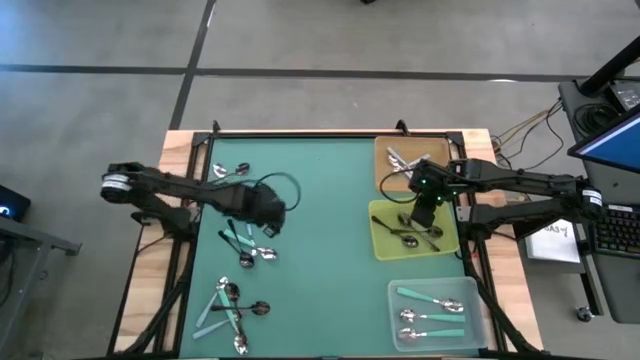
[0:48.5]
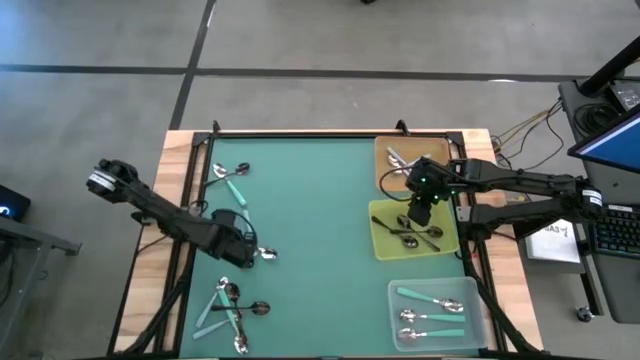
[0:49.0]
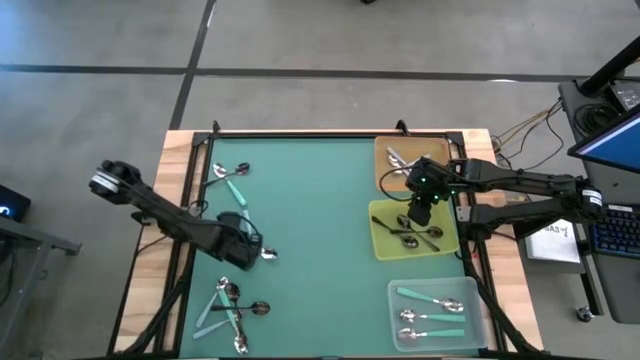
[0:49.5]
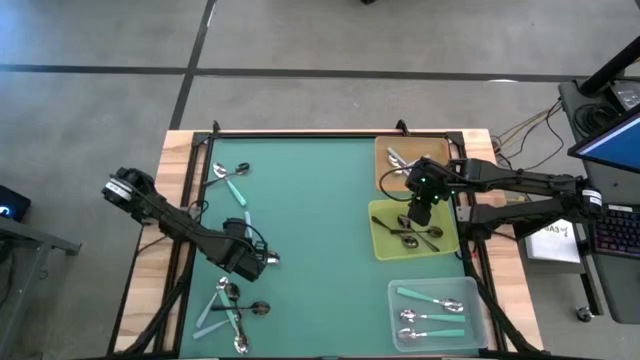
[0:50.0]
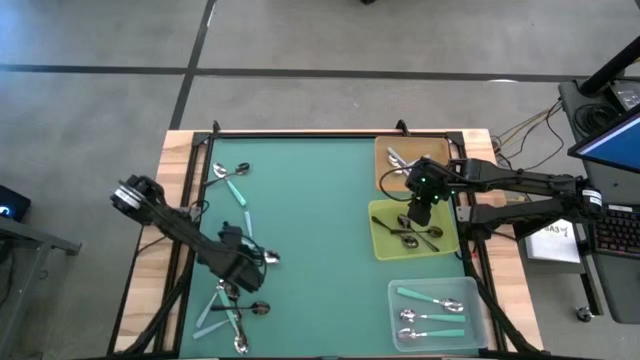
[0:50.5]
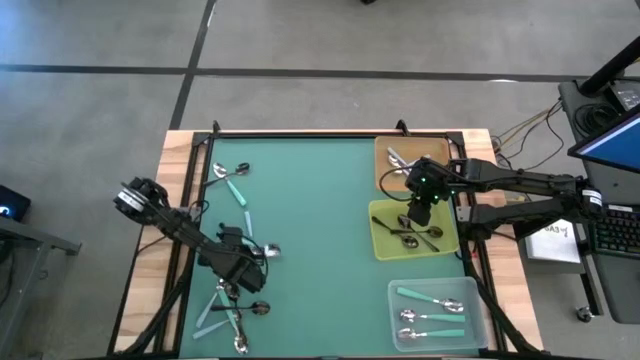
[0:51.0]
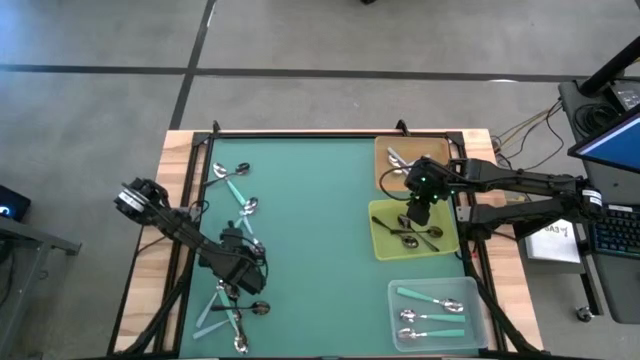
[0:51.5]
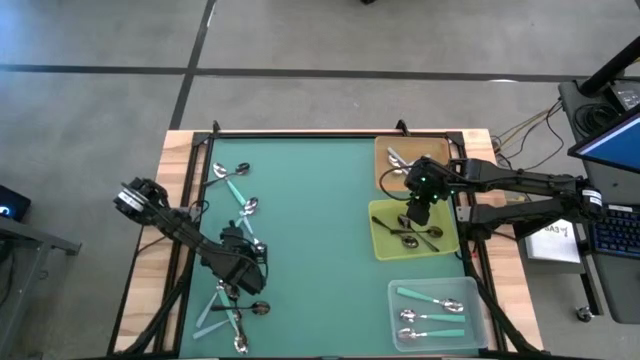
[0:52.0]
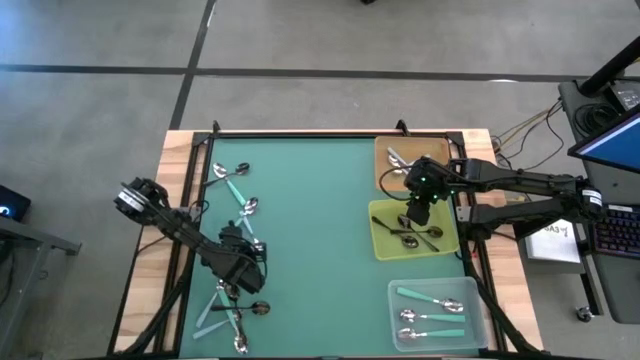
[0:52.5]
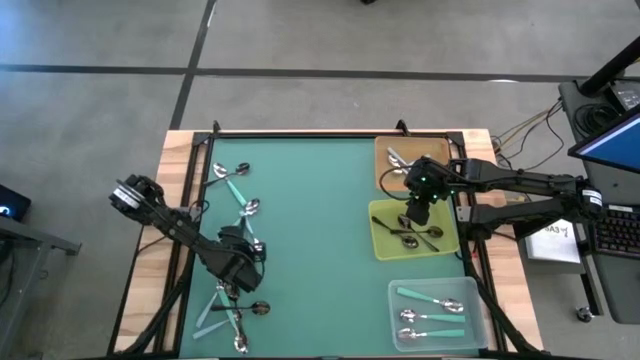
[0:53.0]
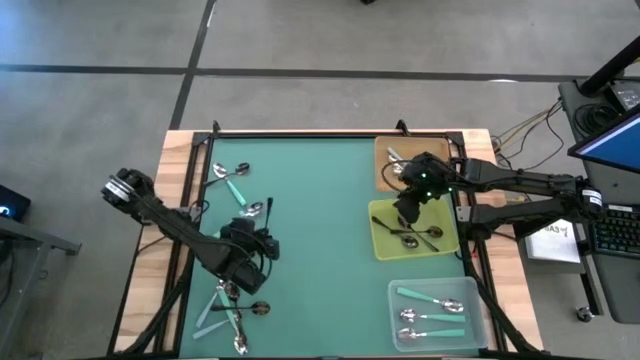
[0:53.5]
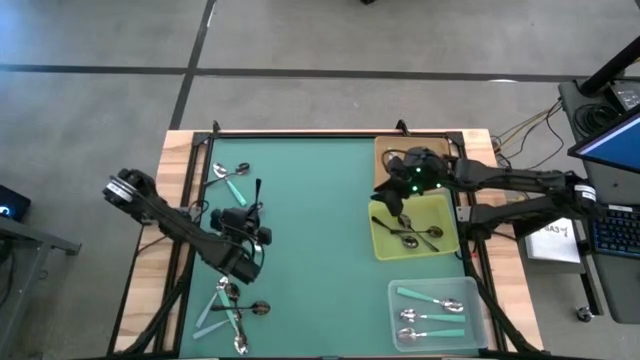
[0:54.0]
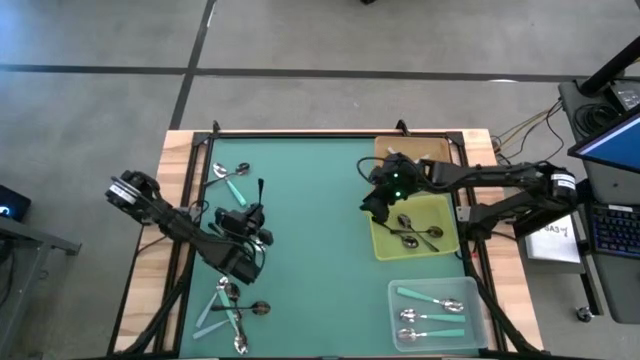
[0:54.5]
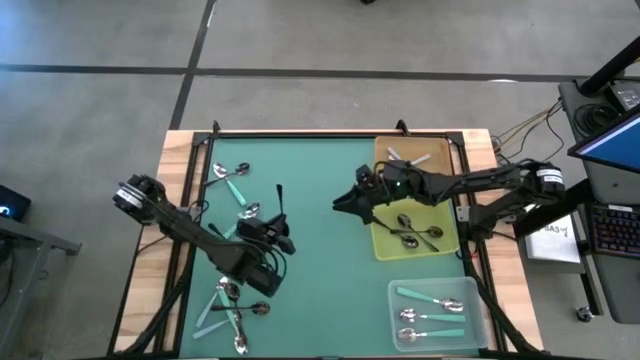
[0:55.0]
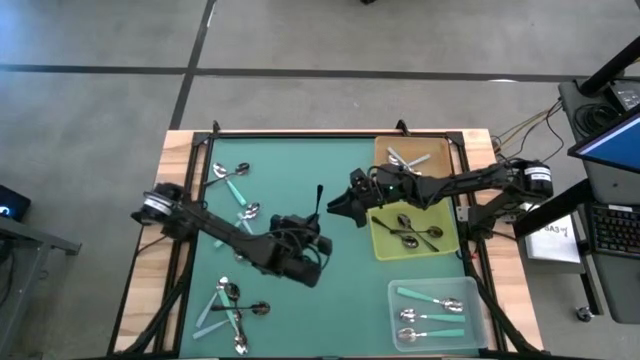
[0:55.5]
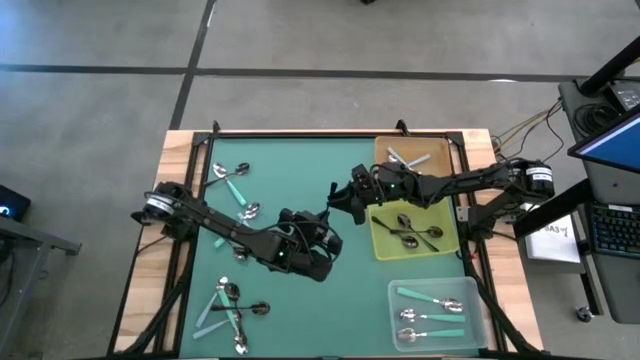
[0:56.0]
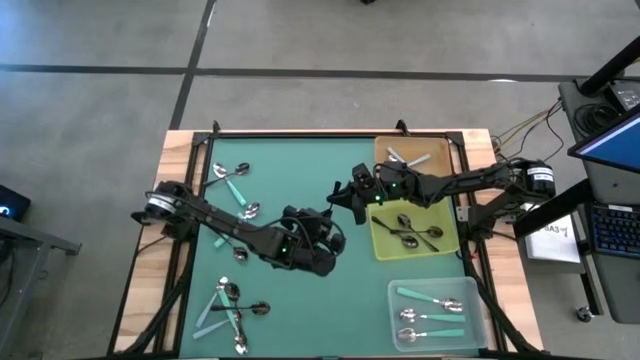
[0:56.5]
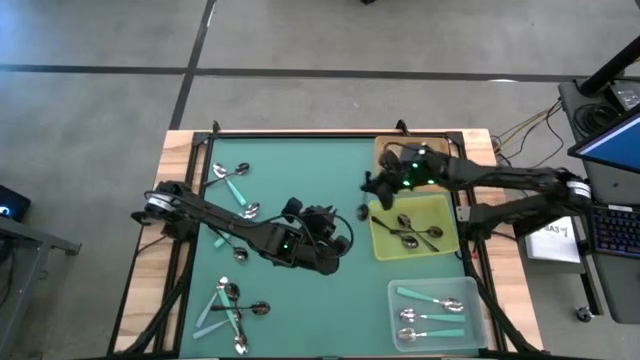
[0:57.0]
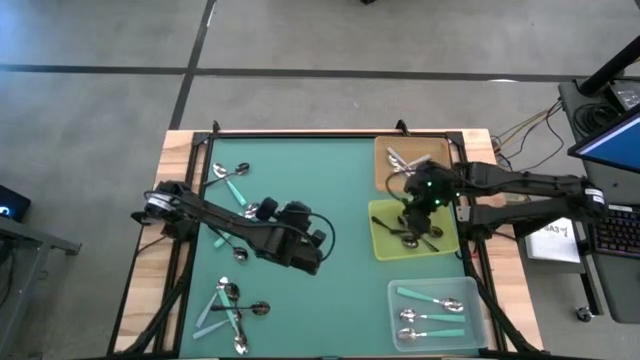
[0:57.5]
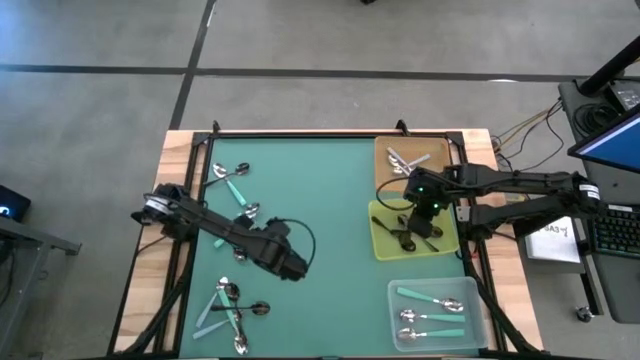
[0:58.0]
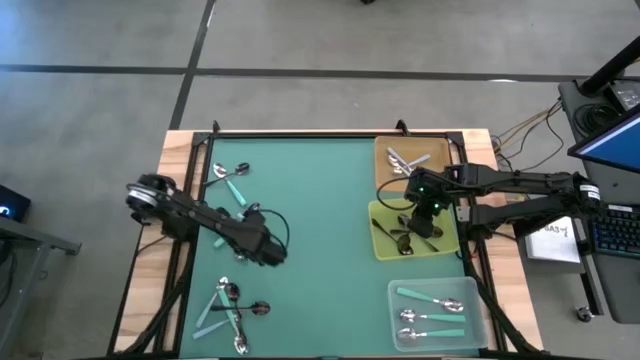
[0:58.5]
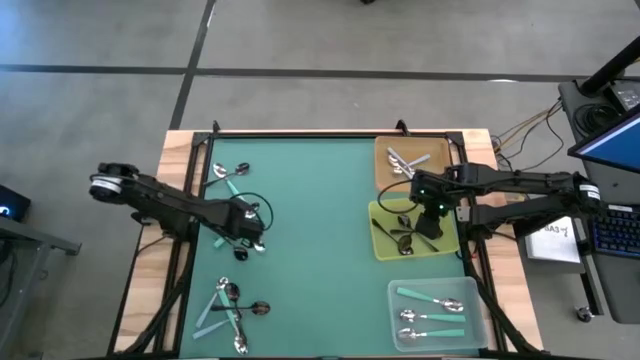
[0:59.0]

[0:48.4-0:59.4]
Task: Sort silverware by color (type)
Put the black spoon into the yellow bin

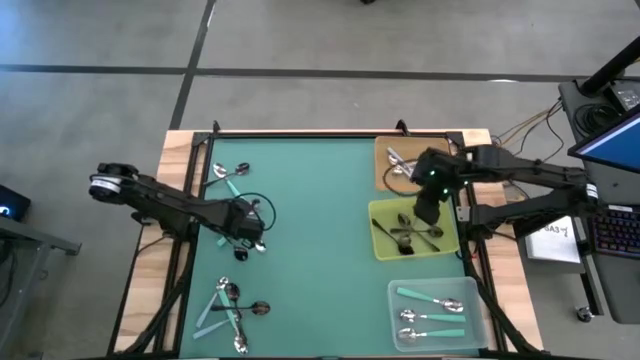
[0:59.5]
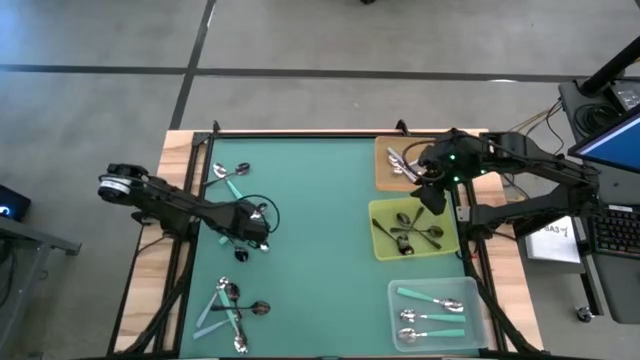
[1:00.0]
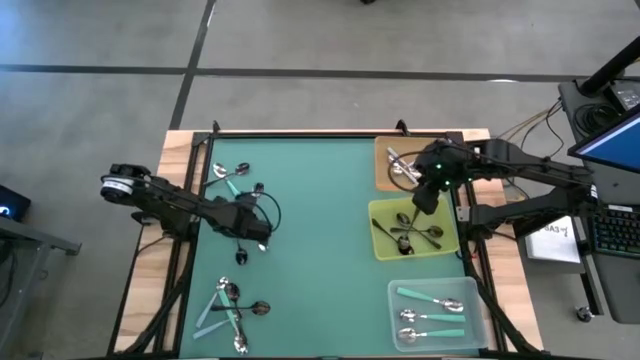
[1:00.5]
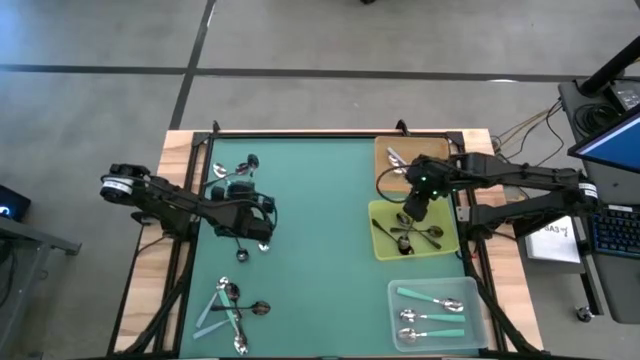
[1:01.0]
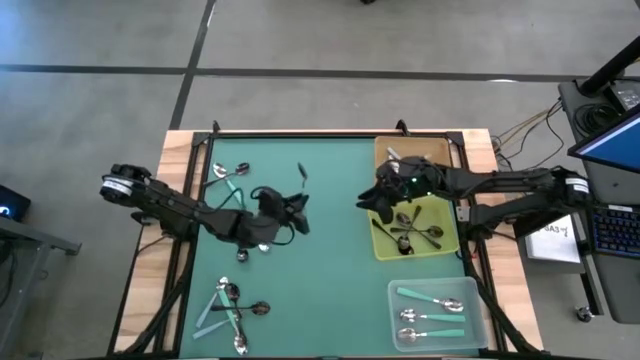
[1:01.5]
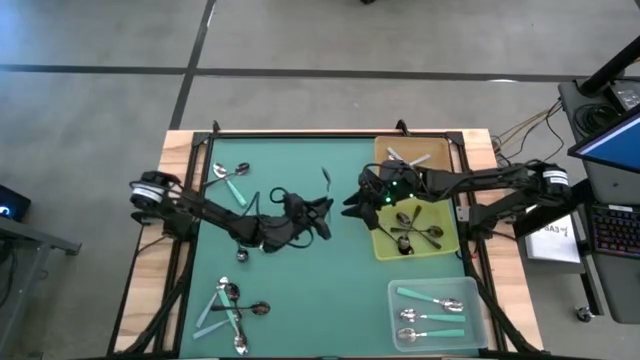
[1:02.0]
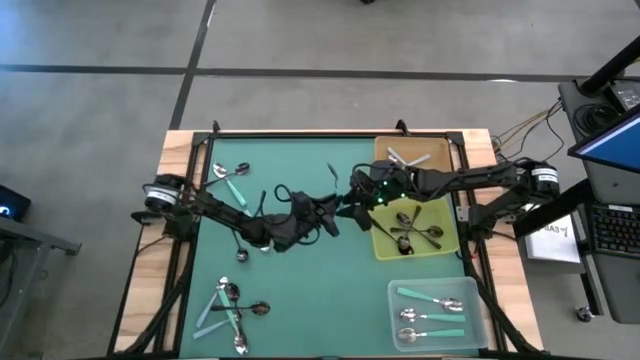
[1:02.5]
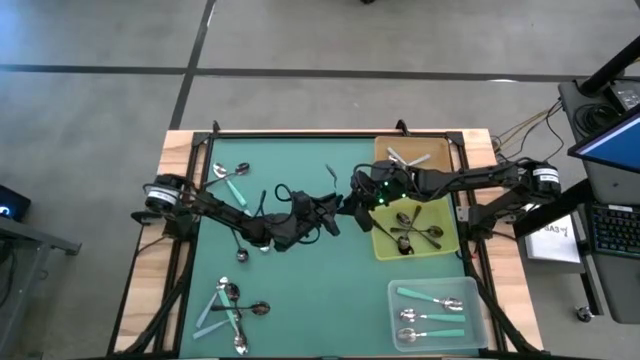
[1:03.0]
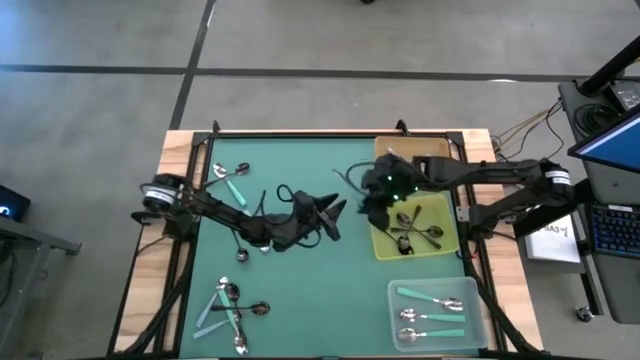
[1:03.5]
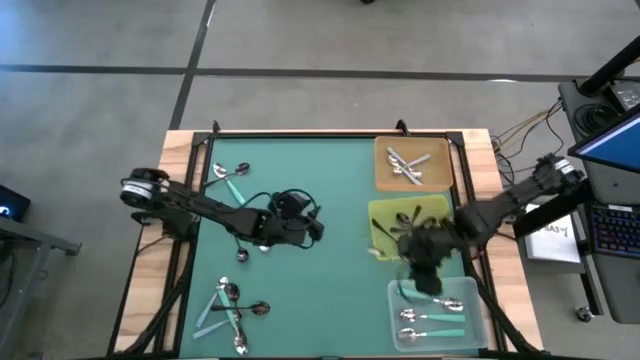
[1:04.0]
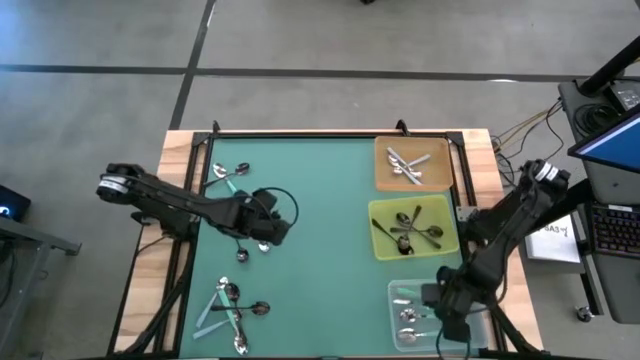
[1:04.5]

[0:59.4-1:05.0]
Put the green spoon into the transparent bin

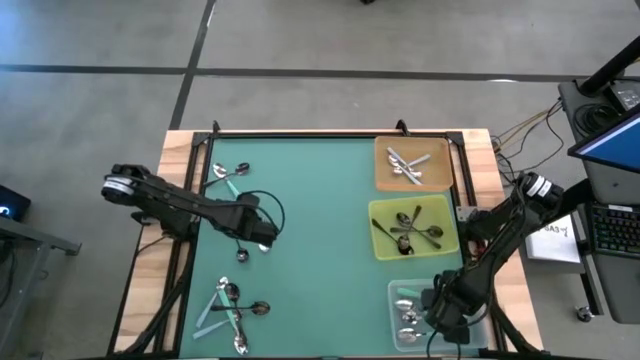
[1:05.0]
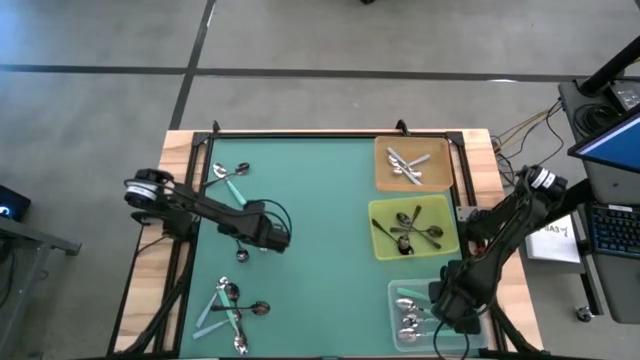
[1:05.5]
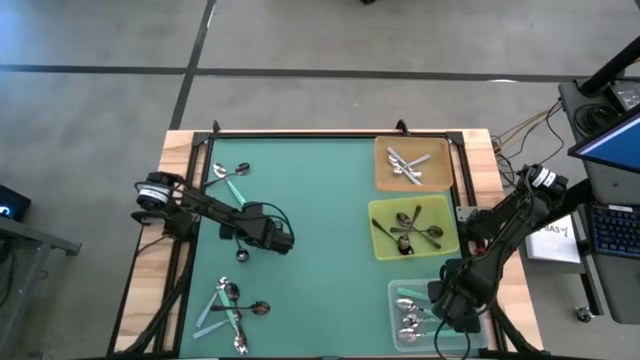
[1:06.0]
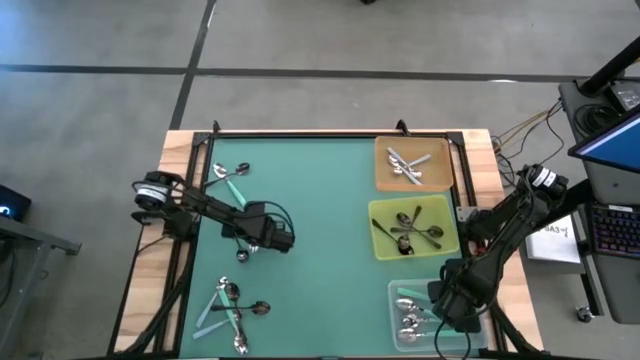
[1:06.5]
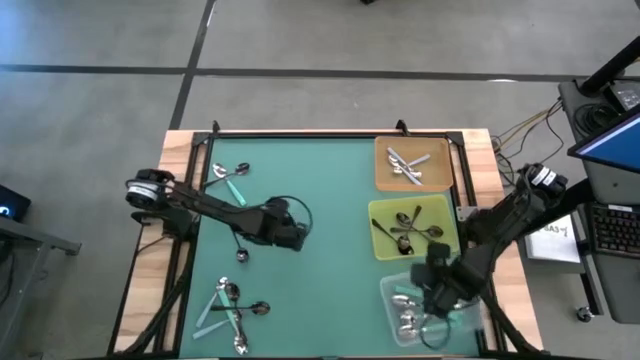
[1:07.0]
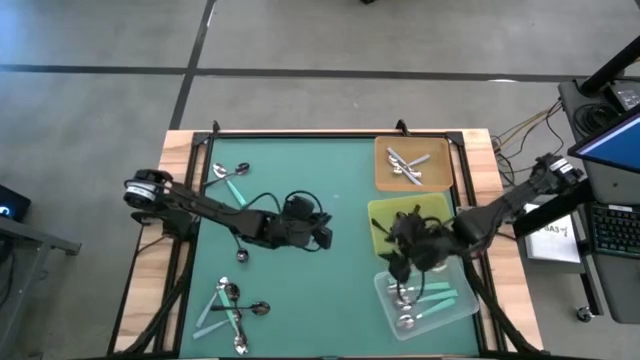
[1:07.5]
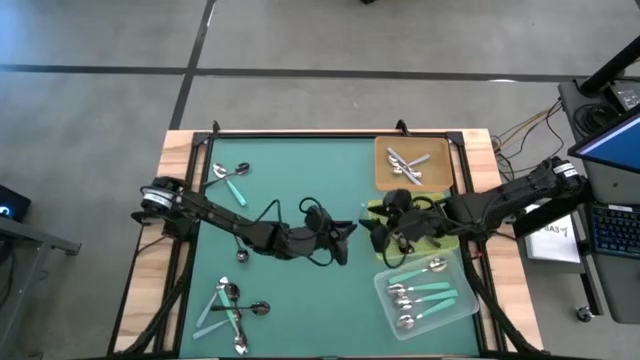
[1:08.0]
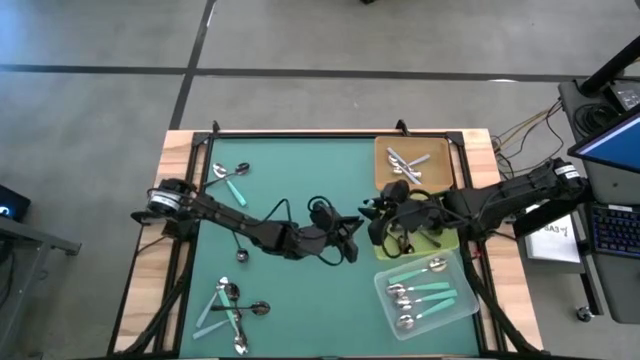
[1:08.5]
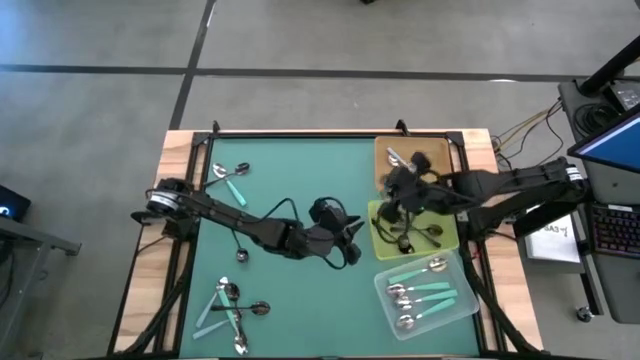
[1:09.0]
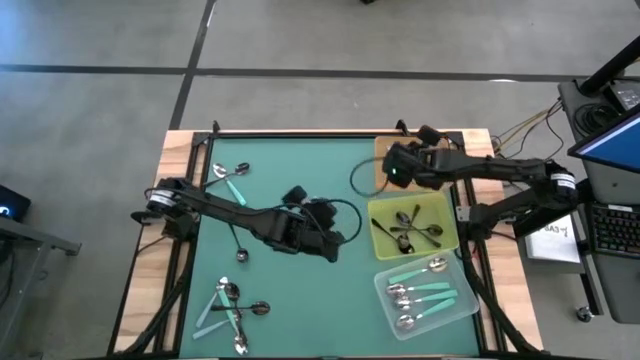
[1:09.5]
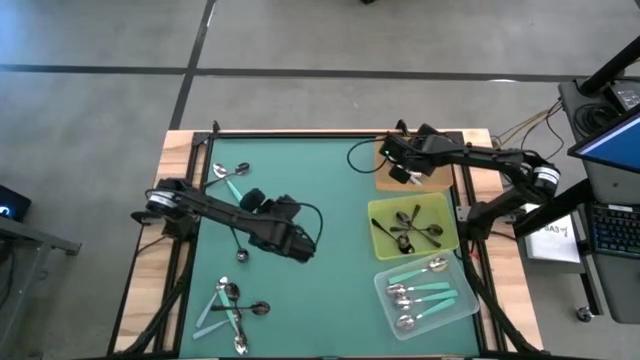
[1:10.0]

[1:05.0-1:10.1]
Put the blue spoon into the orange bin
